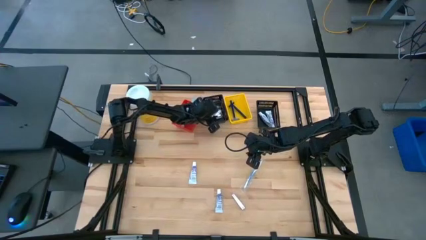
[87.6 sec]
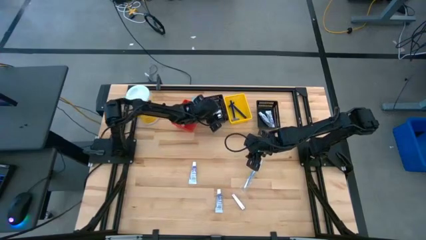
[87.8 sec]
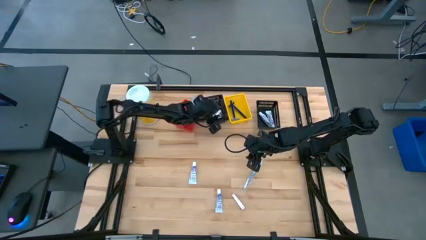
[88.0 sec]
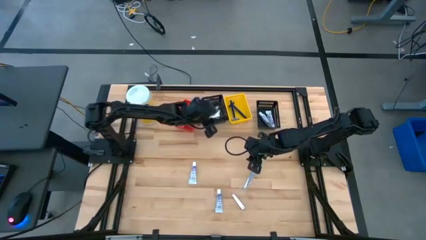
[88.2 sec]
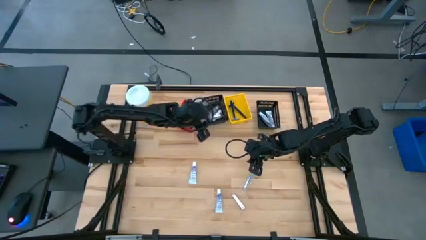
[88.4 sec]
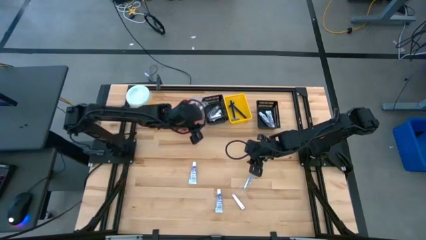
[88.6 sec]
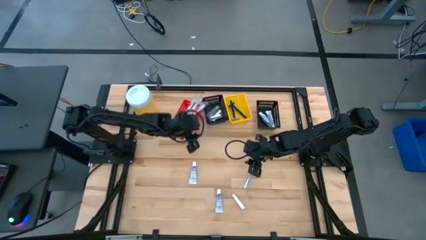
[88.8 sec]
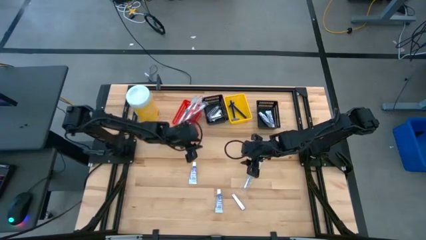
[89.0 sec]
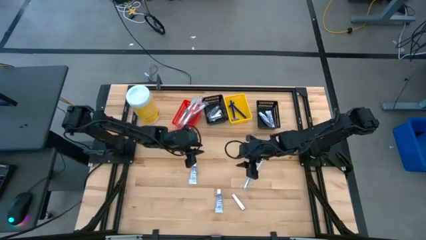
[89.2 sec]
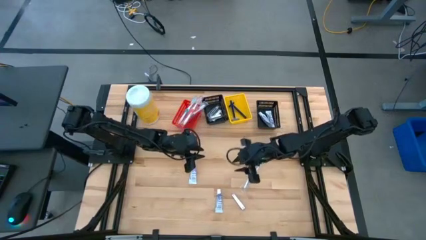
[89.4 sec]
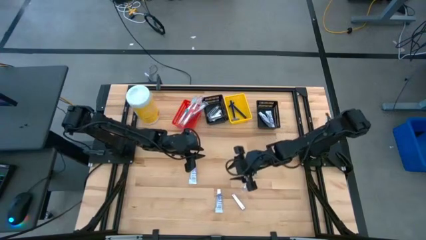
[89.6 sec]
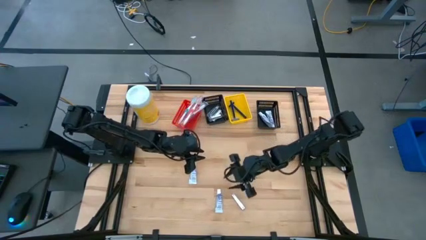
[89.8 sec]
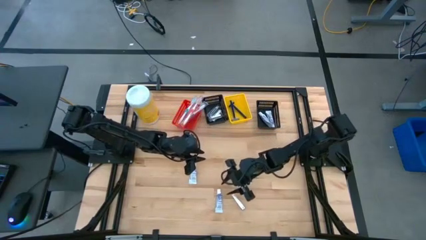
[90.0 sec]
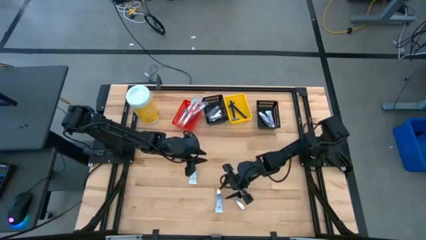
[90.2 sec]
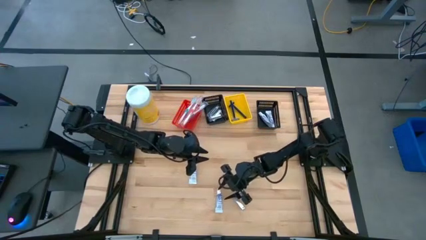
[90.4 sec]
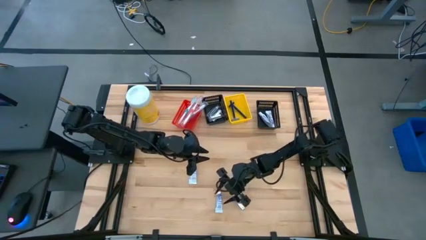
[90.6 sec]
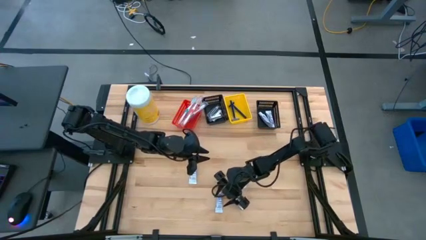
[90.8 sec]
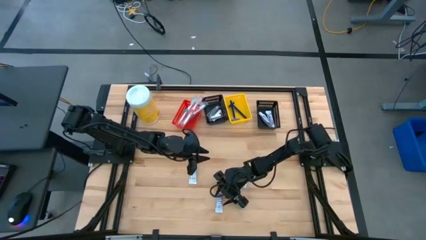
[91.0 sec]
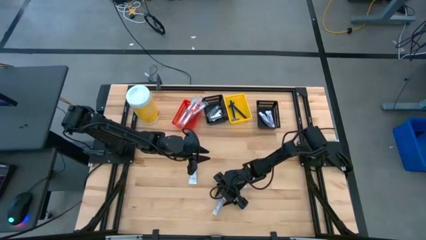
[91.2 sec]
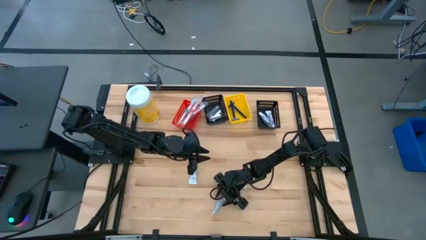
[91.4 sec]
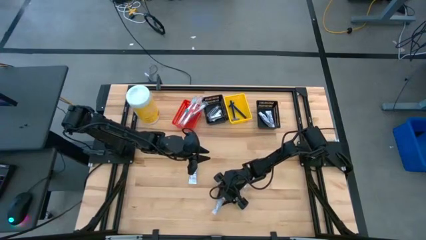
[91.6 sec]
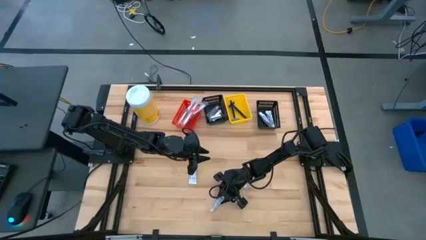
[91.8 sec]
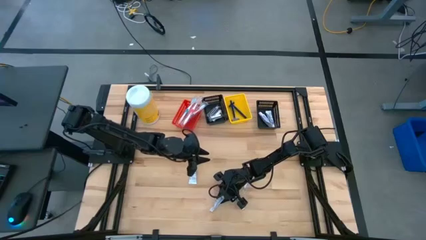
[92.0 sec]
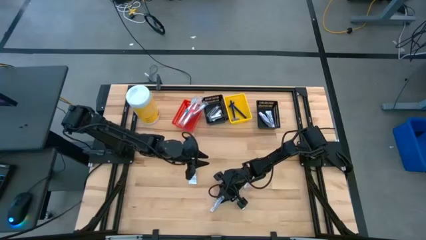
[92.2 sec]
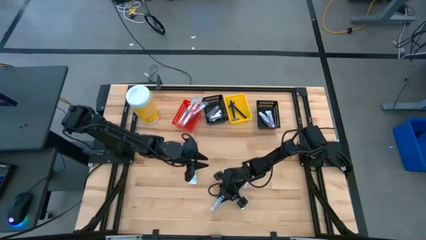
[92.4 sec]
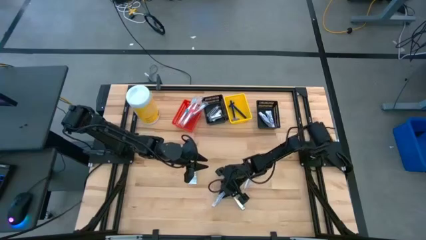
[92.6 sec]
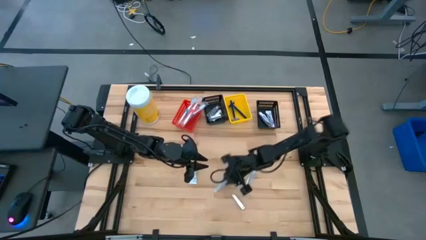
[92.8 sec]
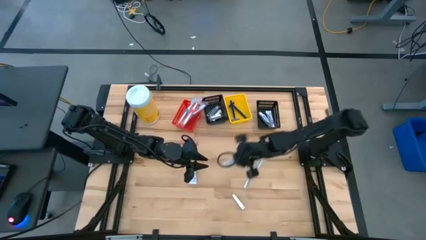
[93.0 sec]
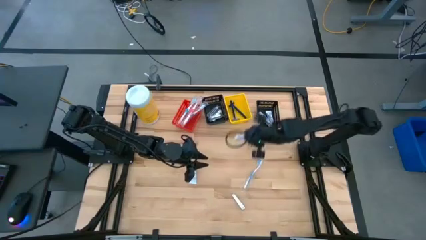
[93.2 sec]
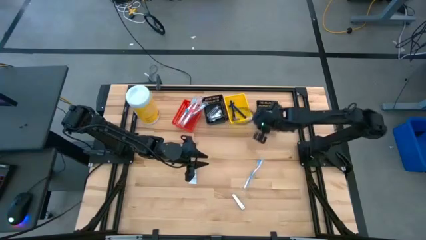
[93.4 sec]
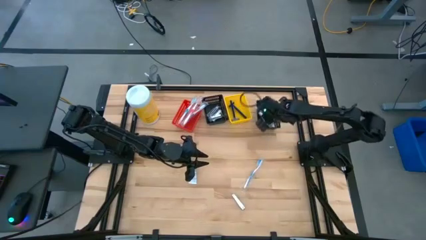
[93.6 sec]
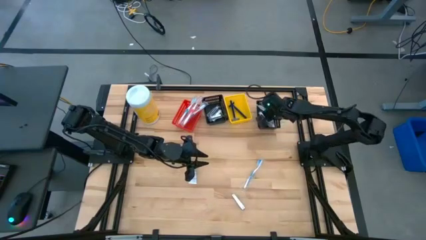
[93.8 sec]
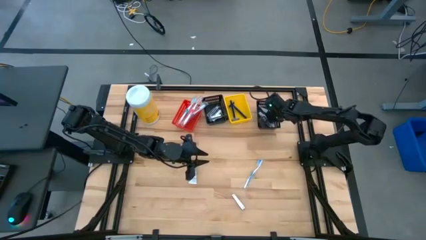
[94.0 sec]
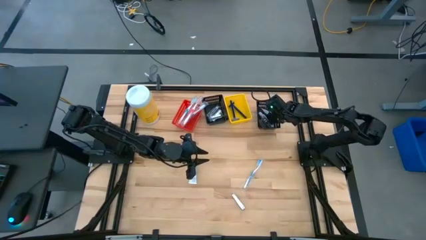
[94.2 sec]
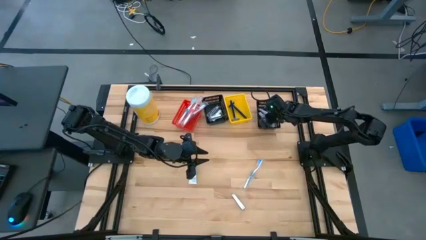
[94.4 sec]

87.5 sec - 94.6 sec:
Task: Pick & Place Travel size toiletries
Put the purple toothpaste into the right black bin

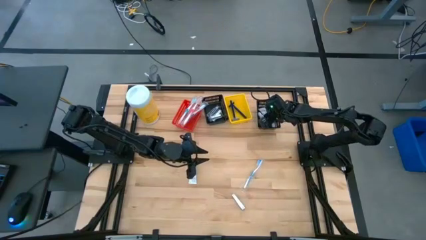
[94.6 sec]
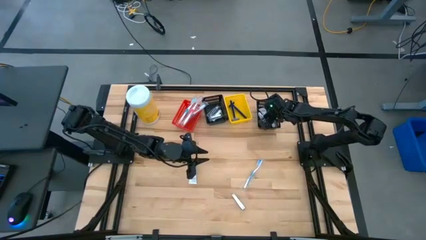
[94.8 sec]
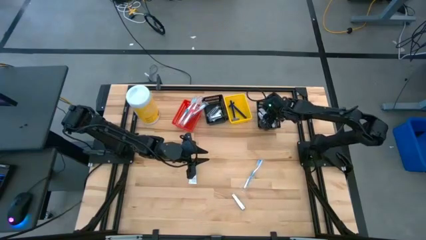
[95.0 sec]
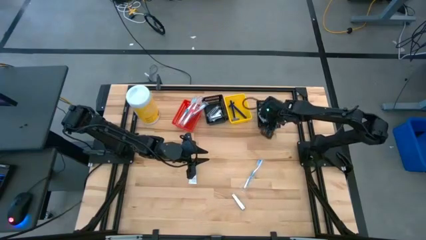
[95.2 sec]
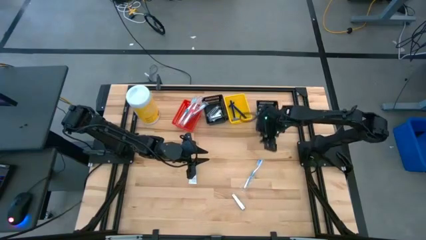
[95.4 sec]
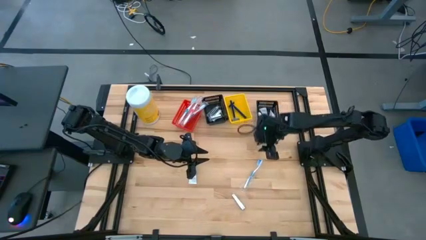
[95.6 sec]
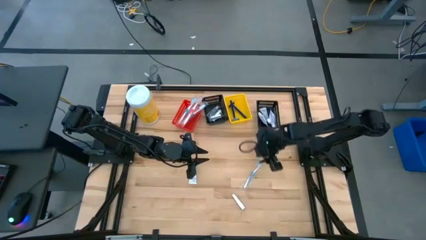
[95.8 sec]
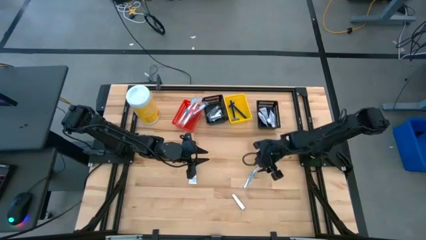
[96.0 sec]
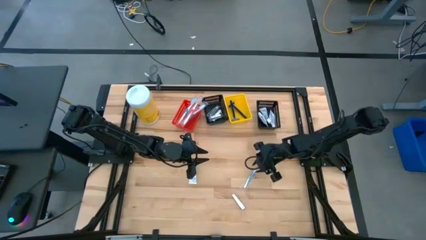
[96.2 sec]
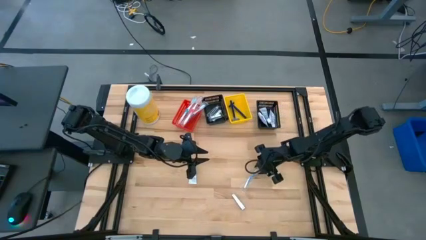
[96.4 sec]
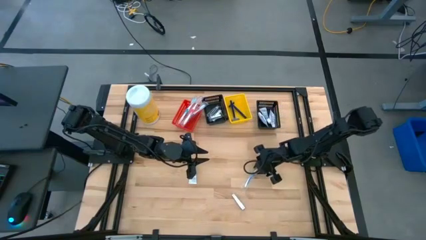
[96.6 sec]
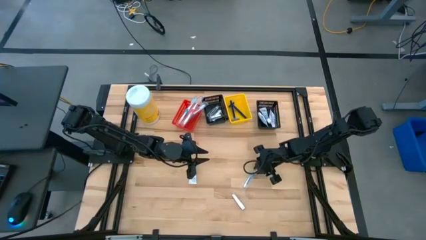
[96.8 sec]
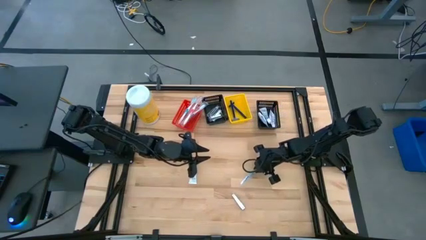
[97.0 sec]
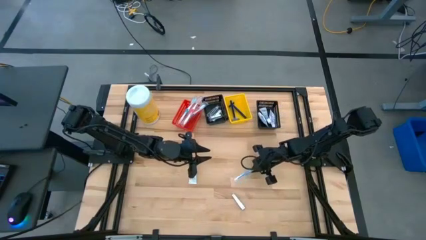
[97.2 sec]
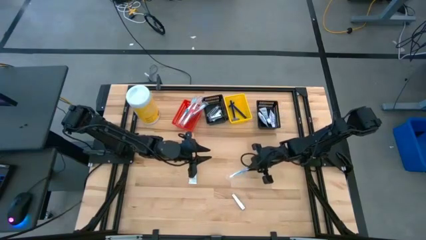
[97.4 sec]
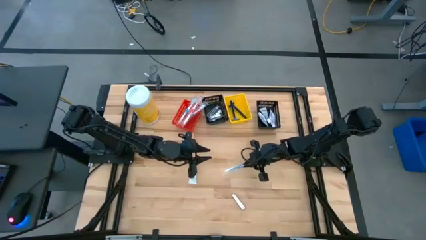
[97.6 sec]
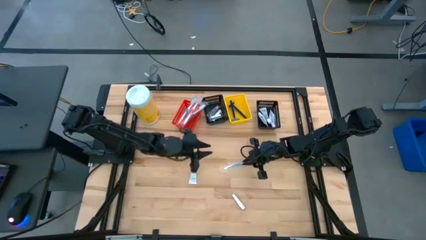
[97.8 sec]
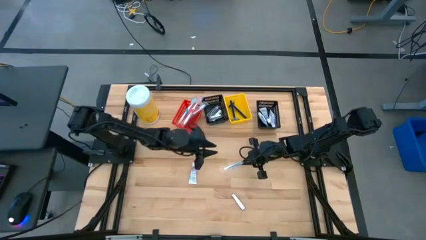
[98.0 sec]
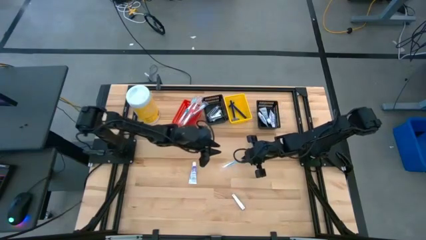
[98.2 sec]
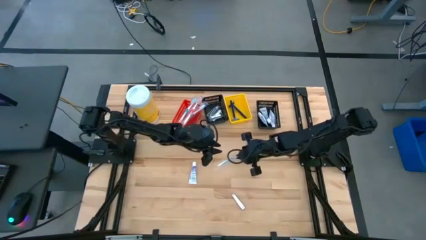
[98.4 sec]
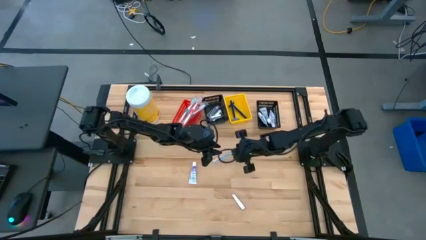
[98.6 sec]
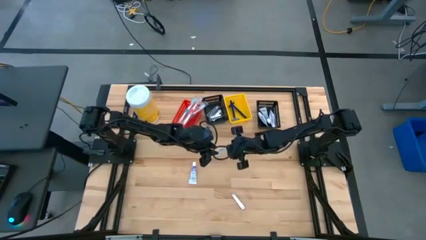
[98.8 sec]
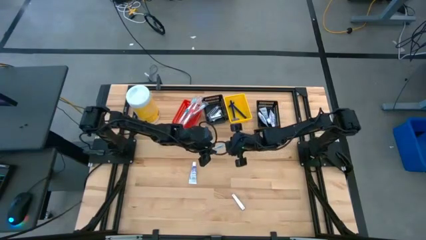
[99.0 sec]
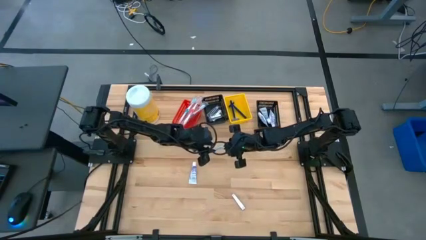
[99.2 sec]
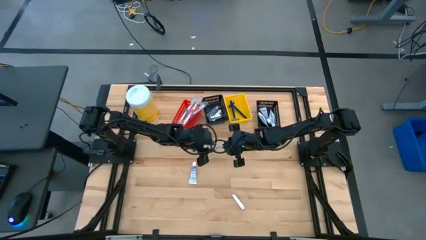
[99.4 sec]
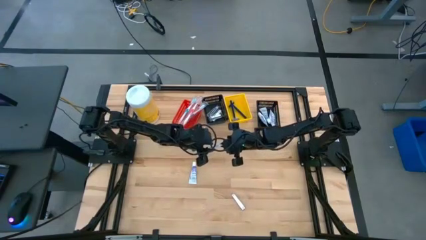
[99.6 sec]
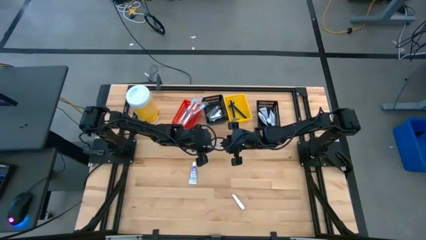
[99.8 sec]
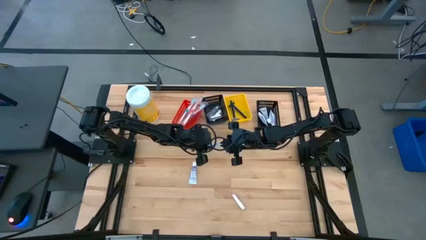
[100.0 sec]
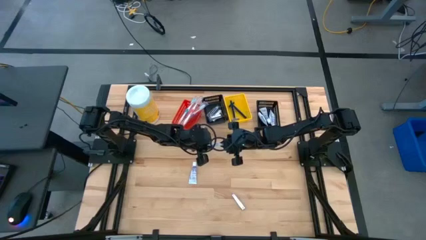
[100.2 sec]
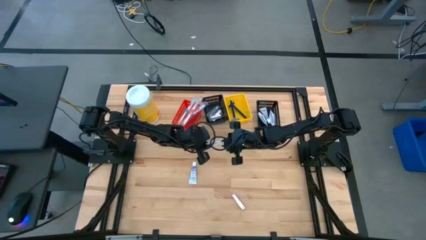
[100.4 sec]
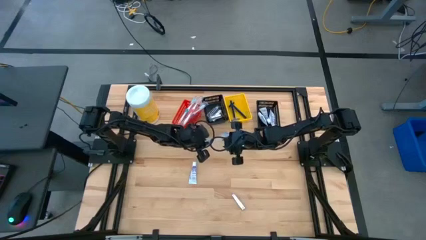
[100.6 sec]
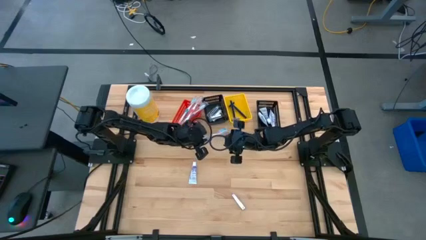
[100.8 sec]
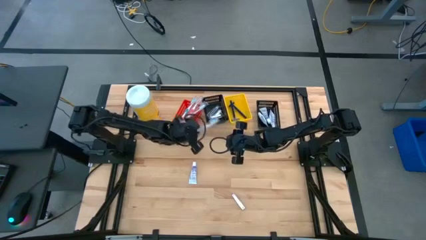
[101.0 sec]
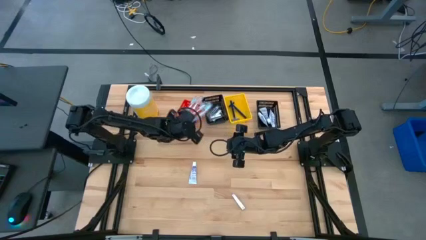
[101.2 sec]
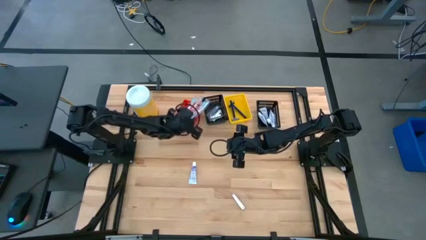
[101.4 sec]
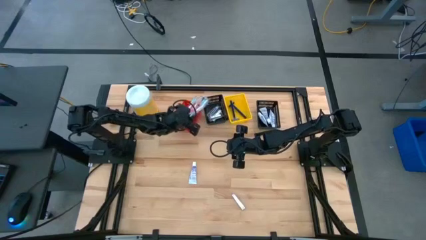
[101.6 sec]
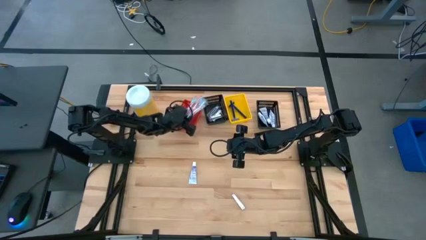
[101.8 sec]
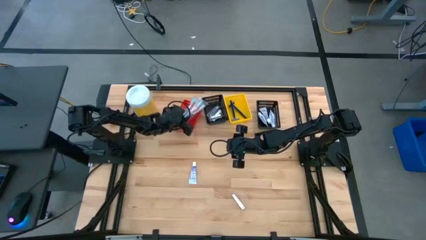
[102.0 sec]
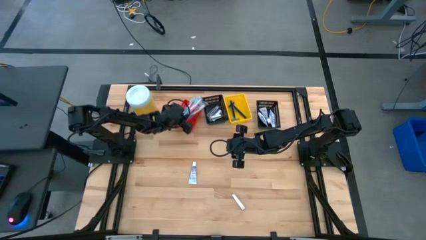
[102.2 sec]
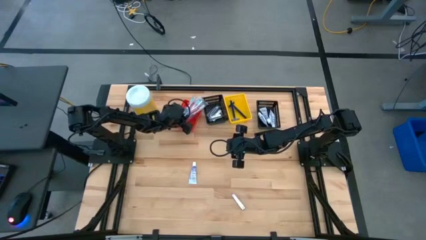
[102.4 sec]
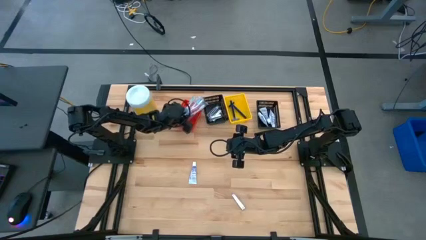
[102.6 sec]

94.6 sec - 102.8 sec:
Put the blue toothbrush into the red bin
